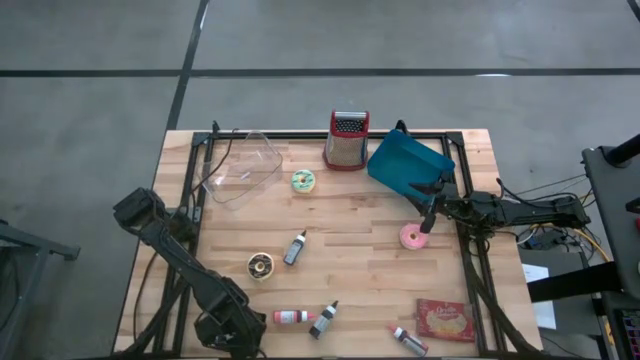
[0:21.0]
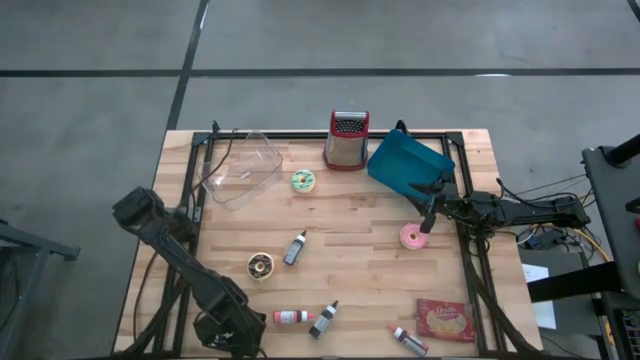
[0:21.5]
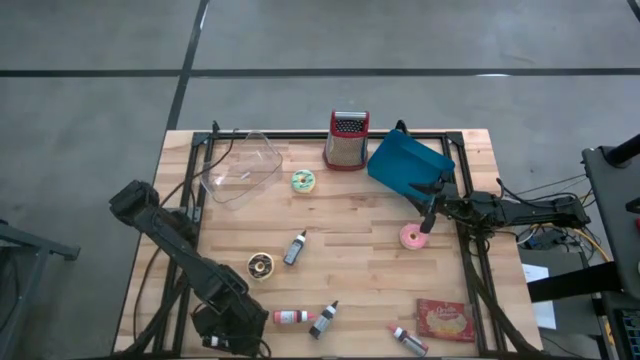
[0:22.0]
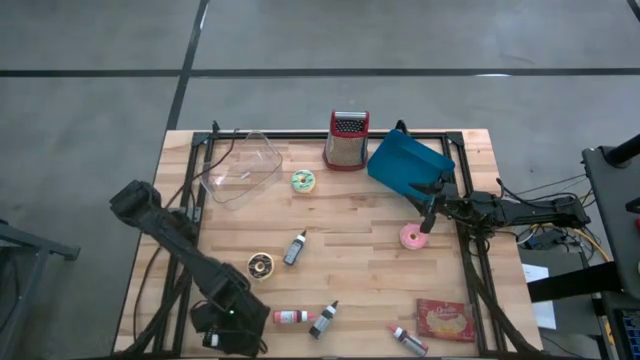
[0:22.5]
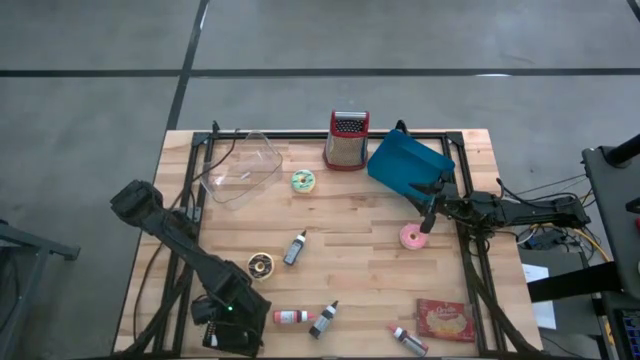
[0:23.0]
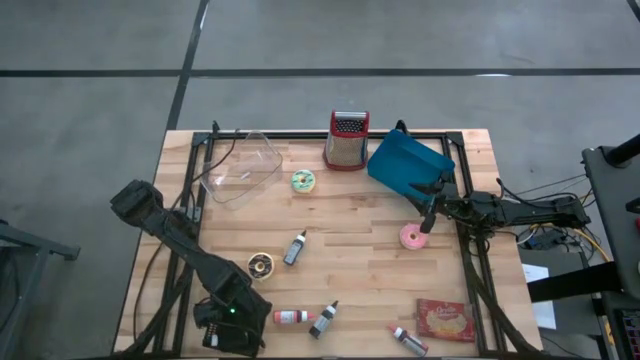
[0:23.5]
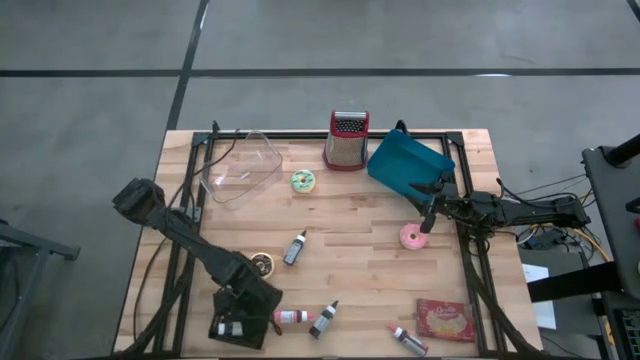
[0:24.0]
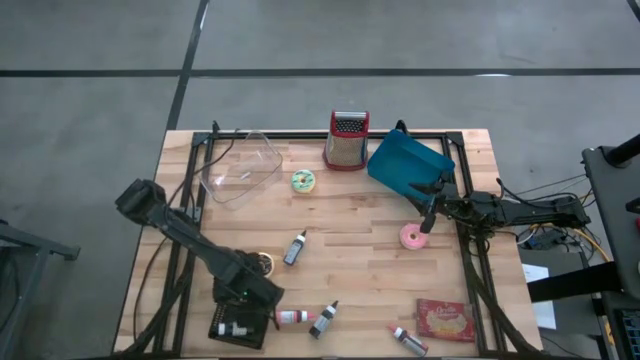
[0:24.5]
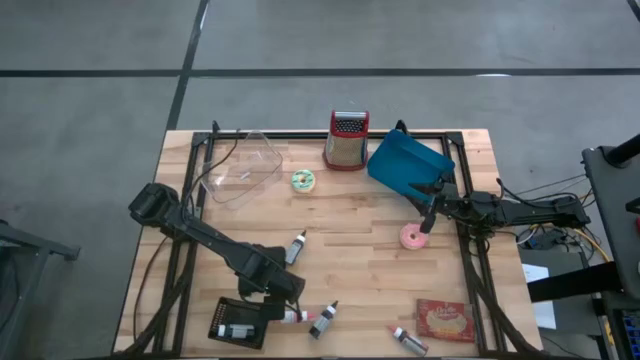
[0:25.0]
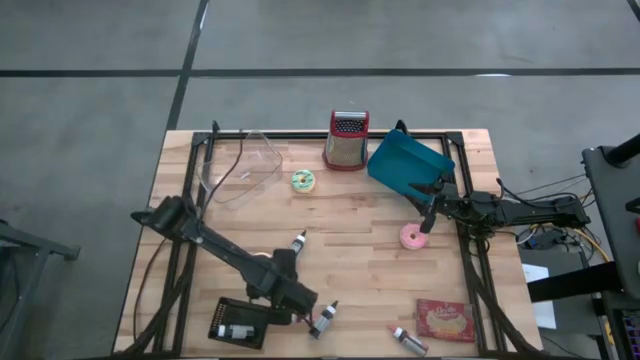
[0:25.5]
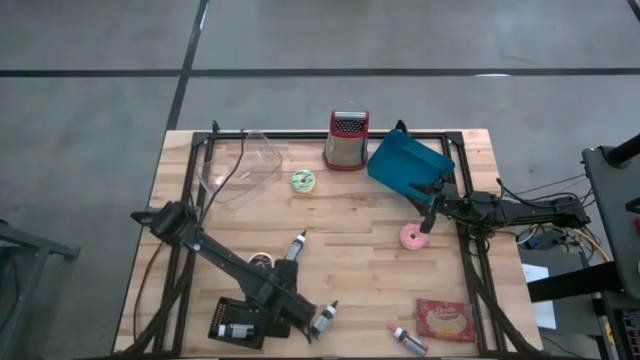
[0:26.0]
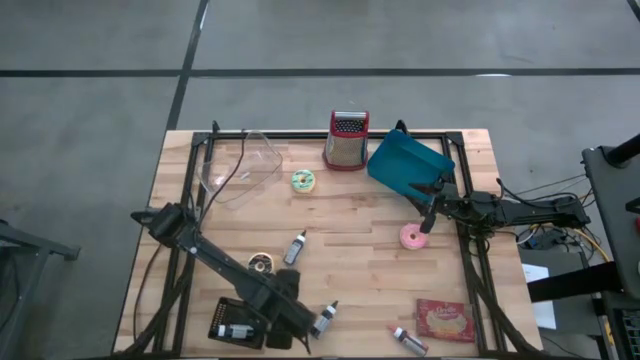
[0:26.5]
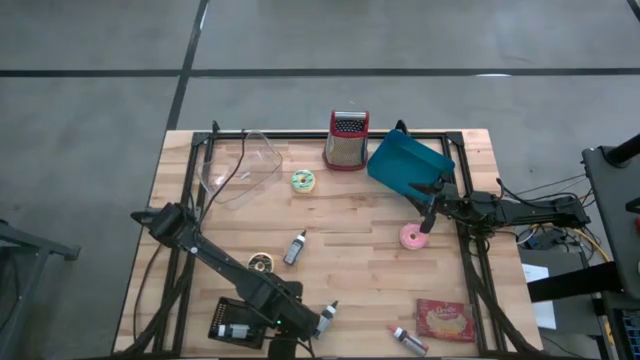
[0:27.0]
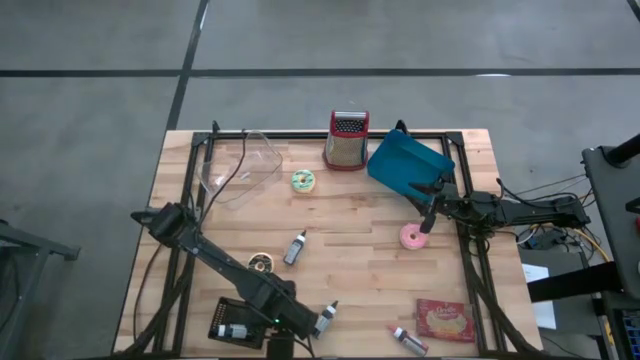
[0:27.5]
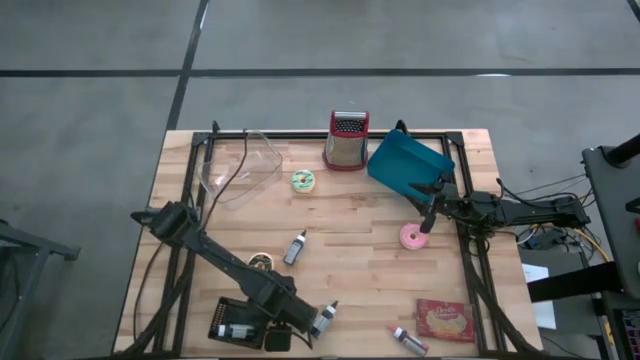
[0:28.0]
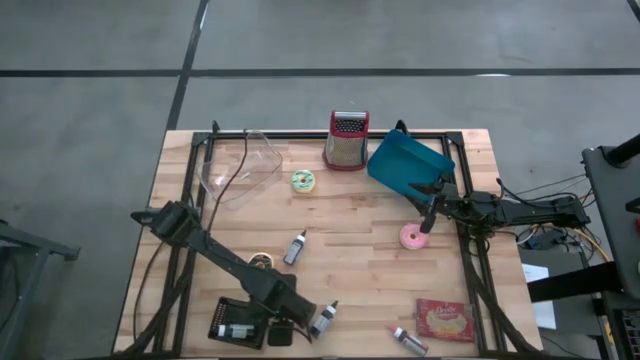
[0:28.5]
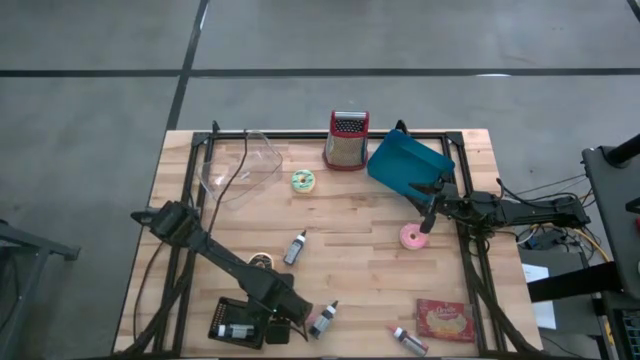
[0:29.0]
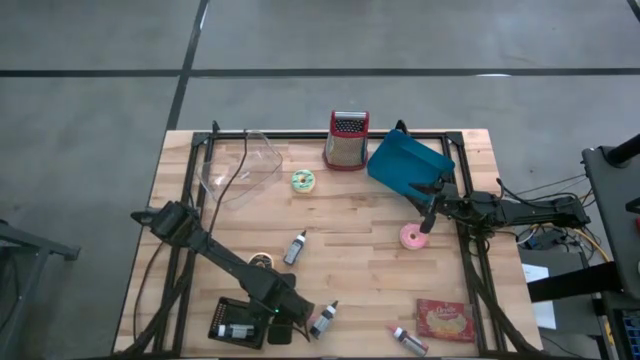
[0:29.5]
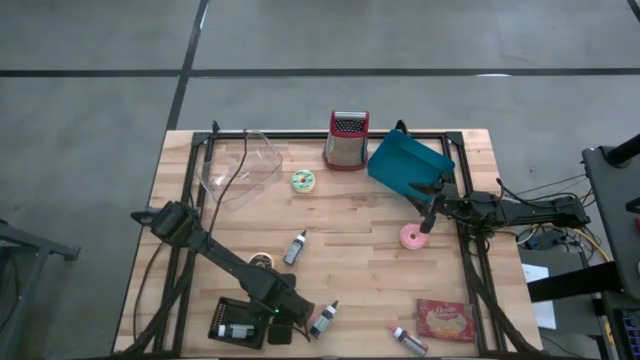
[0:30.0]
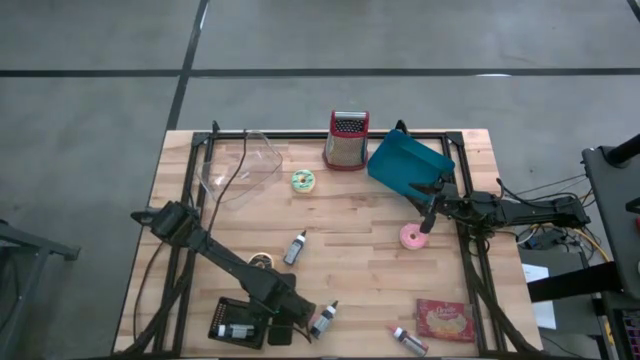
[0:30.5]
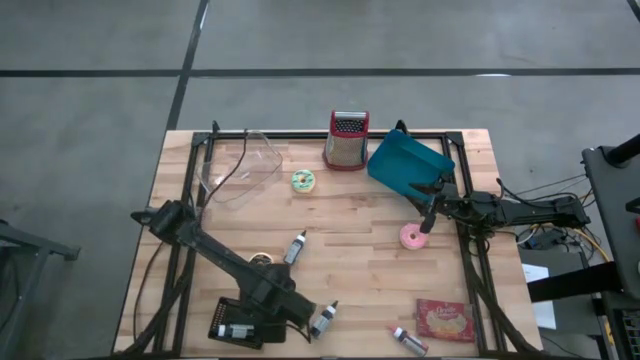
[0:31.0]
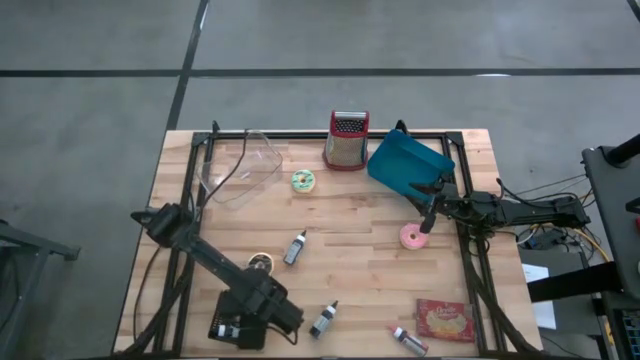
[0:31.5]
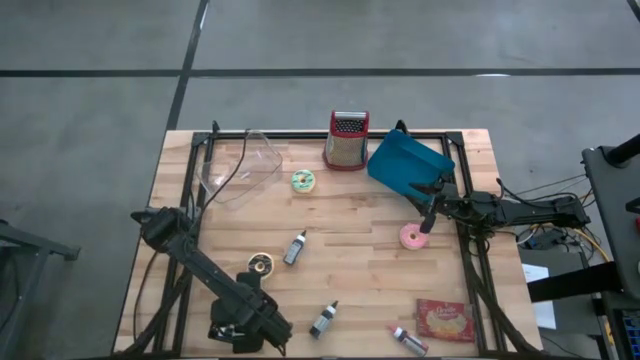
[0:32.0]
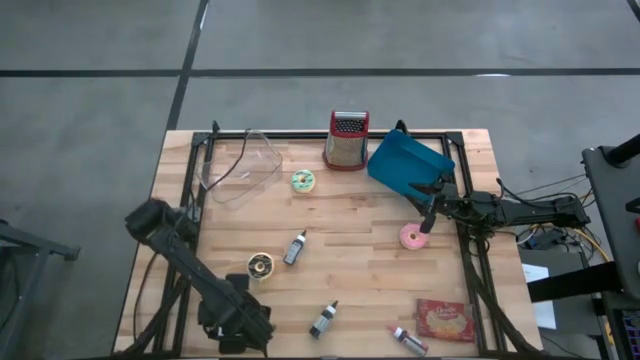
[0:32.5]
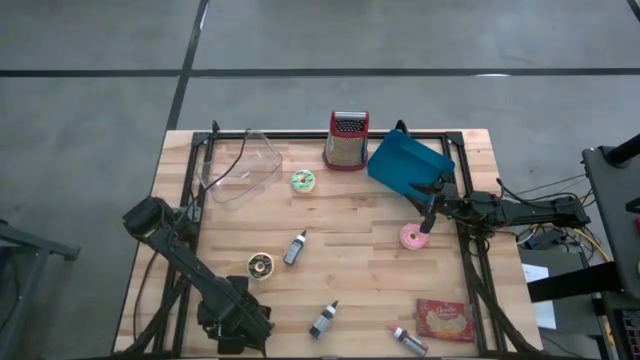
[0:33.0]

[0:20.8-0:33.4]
Task: Pick & Place Food Item
Put the left pink food coloring bottle into the black bin

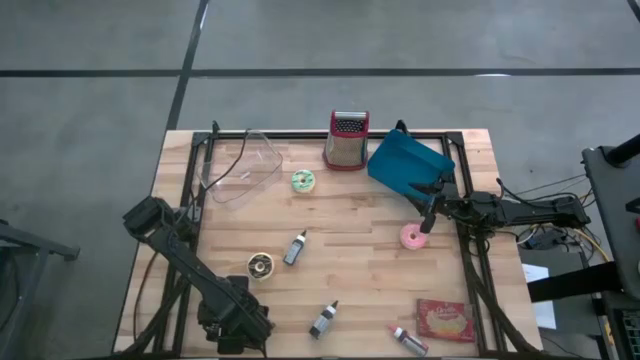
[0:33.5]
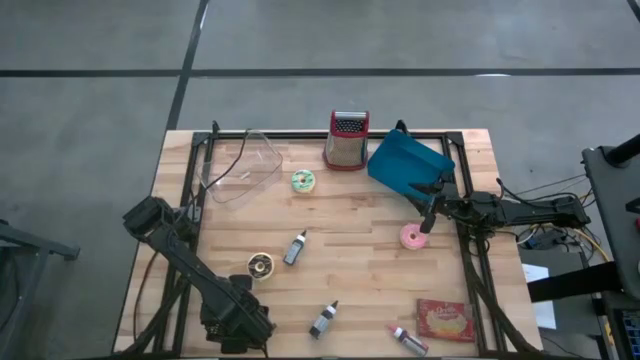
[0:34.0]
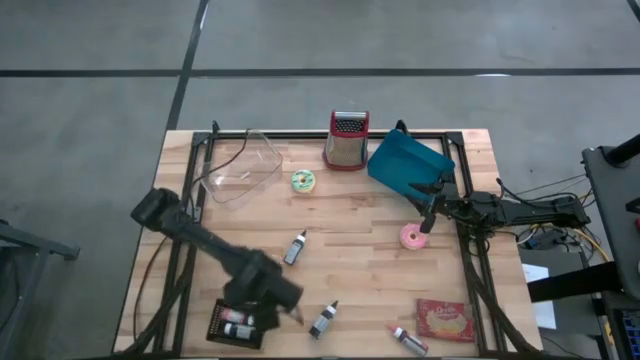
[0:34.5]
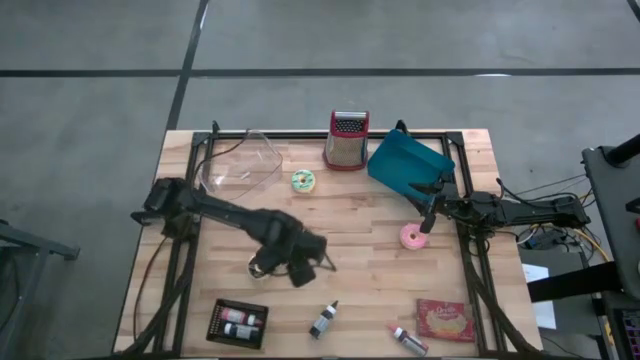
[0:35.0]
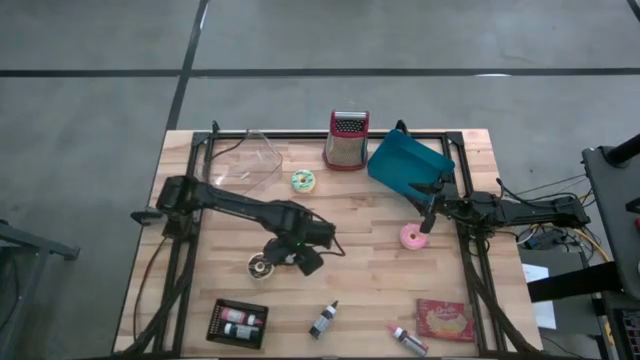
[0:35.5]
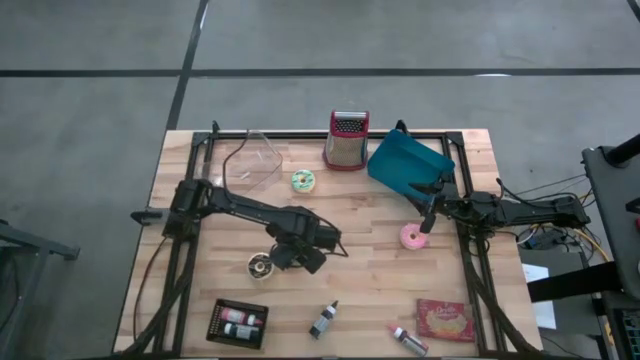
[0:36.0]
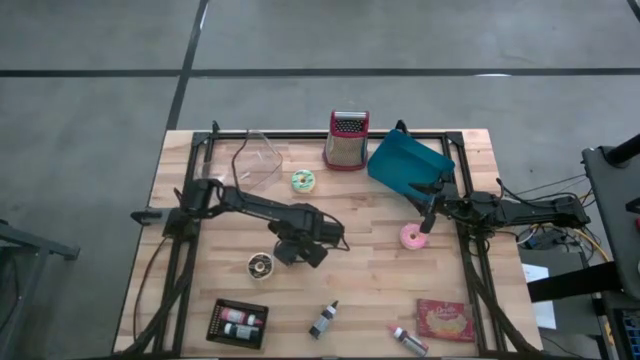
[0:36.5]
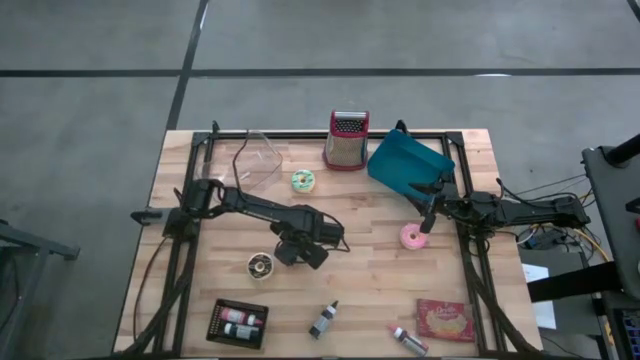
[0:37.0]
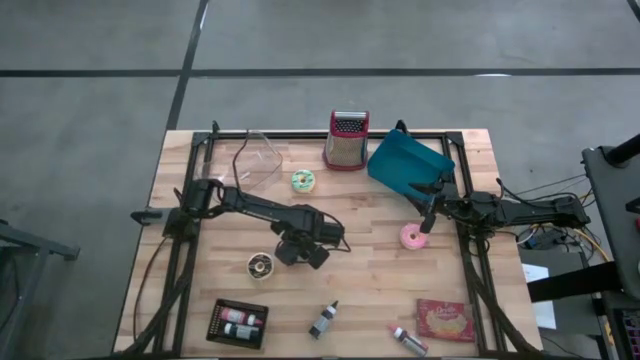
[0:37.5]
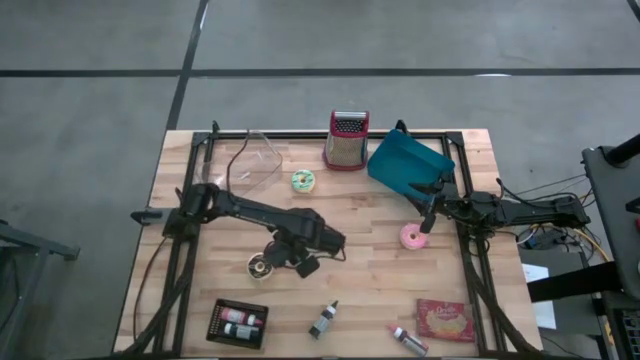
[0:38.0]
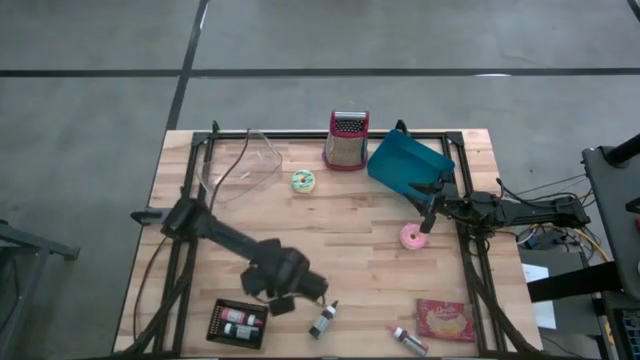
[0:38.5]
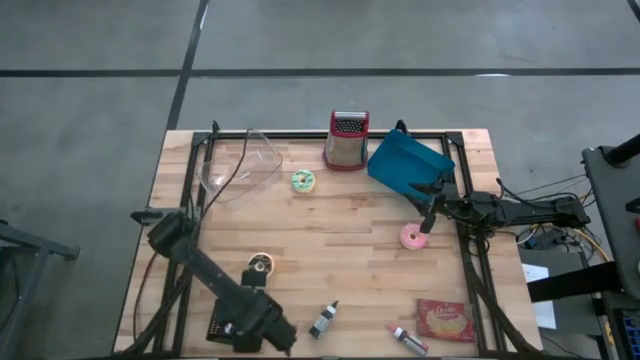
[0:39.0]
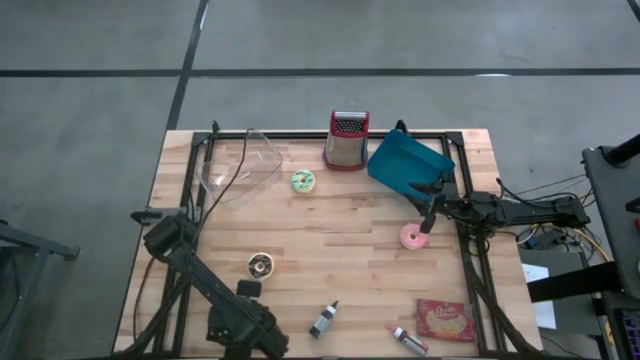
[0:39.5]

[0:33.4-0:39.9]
Put the top black food coloring bottle into the black bin

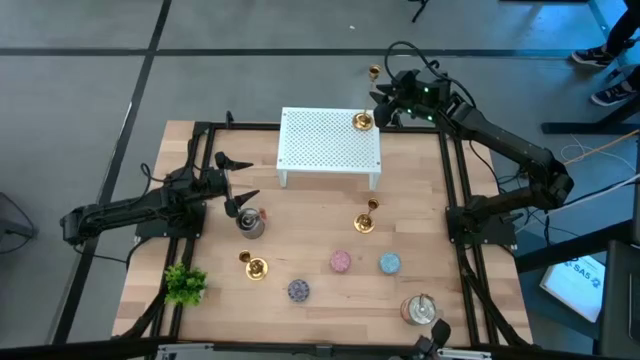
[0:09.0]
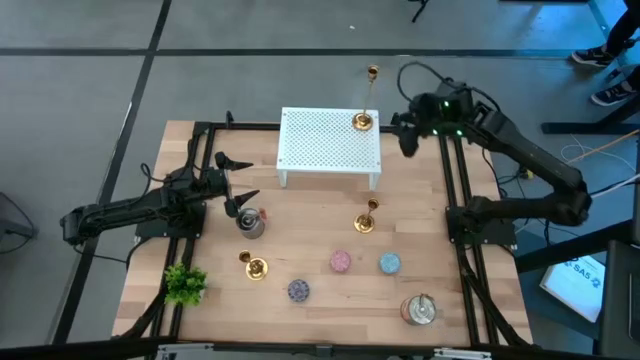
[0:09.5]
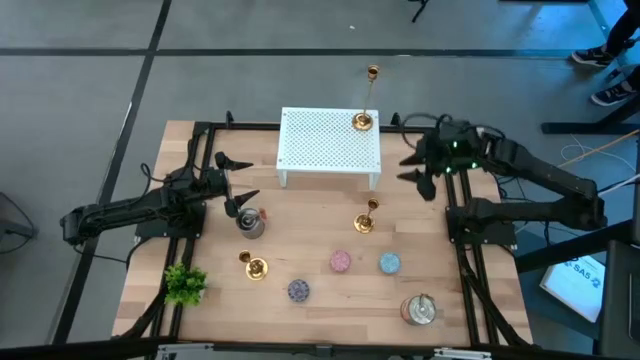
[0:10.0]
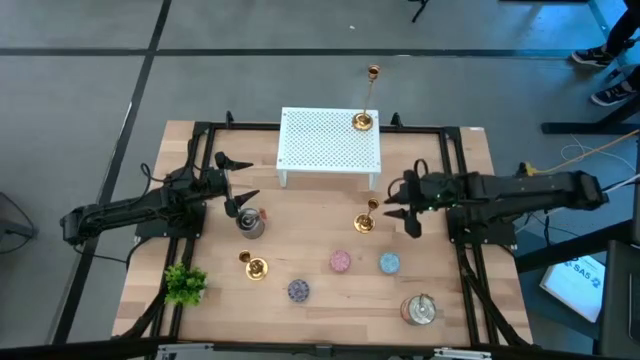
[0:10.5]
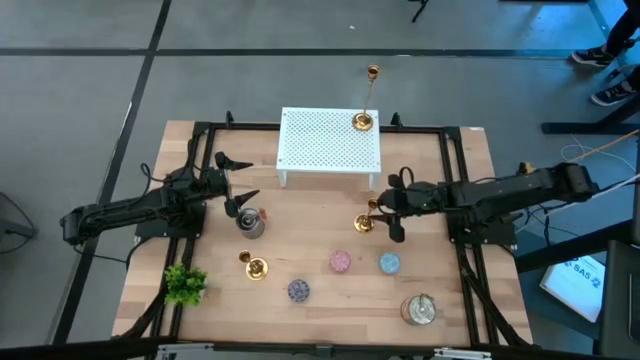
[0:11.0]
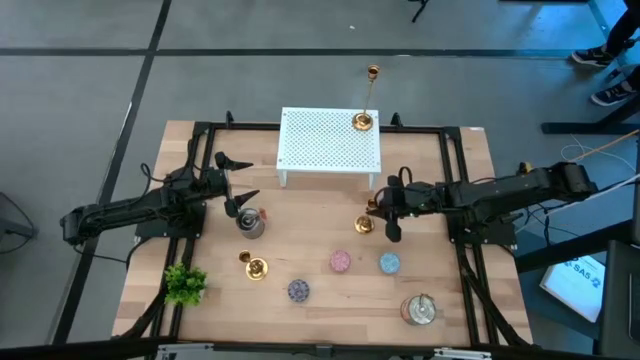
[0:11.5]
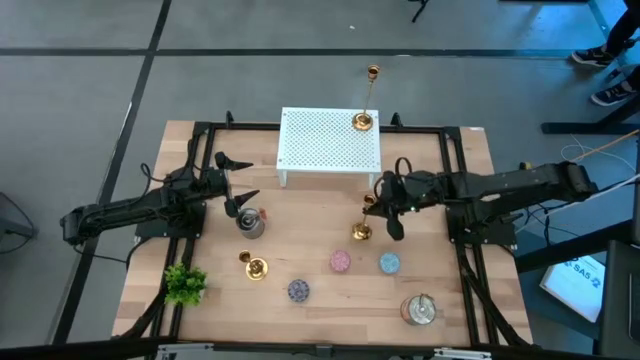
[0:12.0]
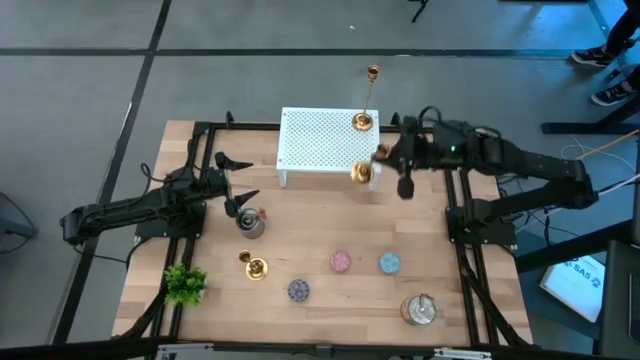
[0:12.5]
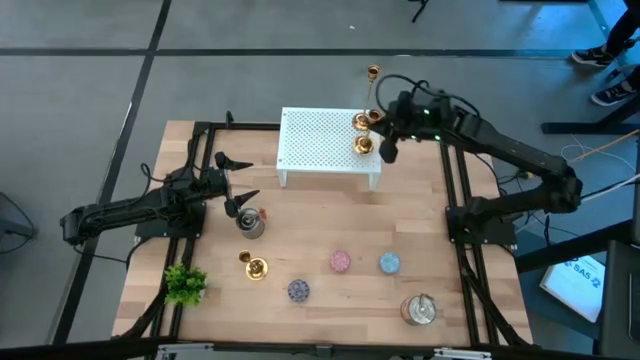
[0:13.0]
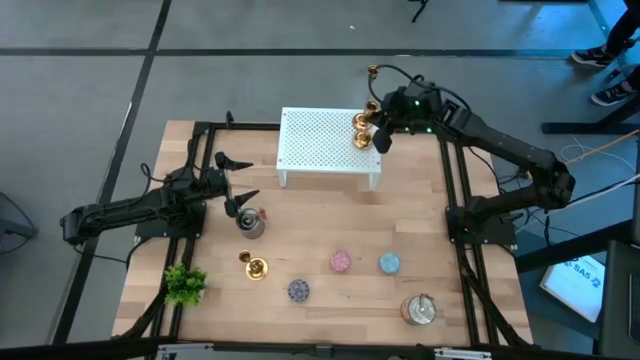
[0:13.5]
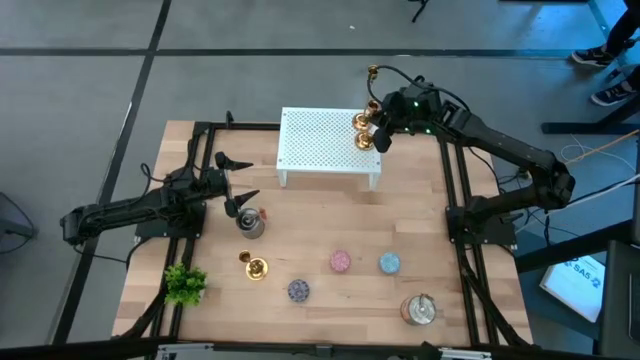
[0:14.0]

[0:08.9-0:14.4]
Task: Pick & Place candle stick holders
Align the top gold candle holder with the gold candle holder on the shelf
